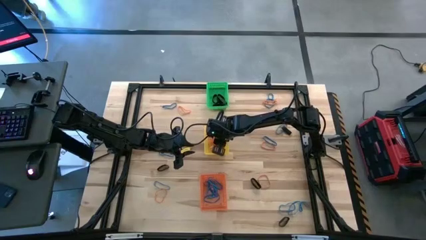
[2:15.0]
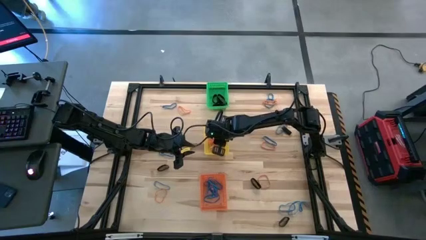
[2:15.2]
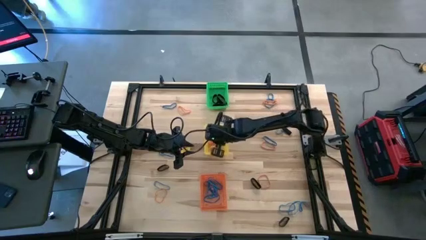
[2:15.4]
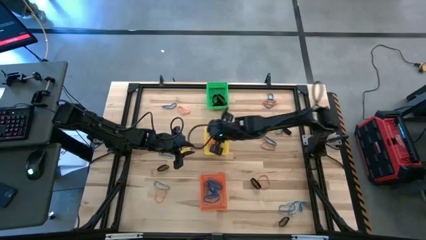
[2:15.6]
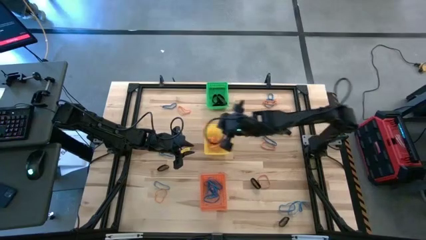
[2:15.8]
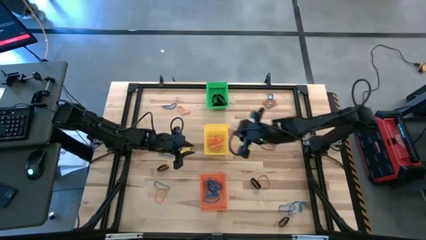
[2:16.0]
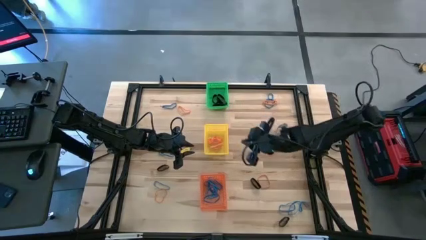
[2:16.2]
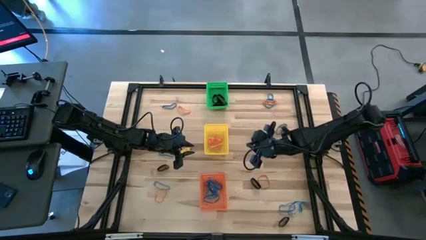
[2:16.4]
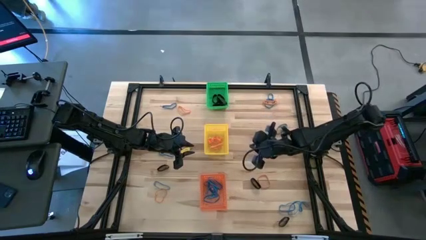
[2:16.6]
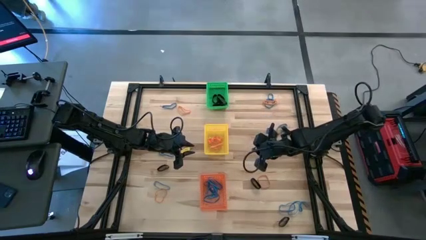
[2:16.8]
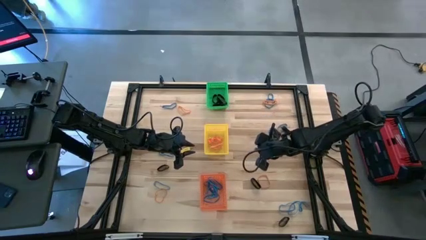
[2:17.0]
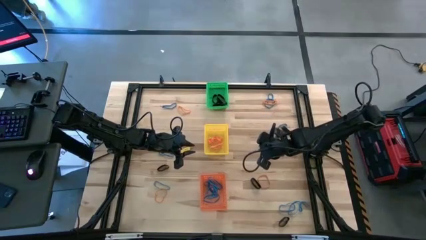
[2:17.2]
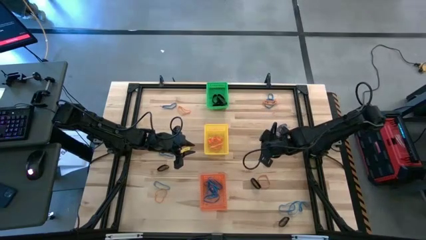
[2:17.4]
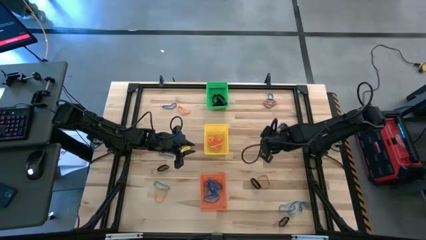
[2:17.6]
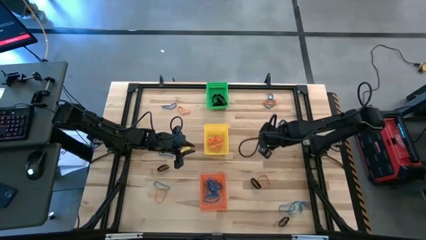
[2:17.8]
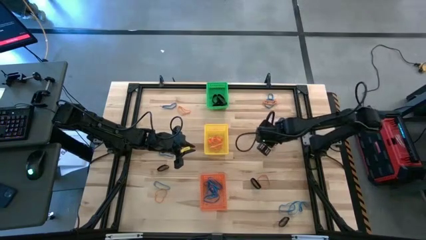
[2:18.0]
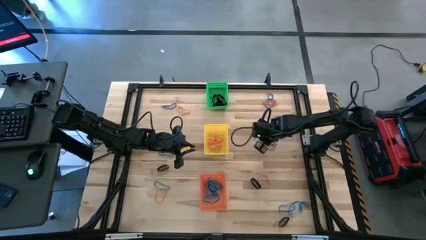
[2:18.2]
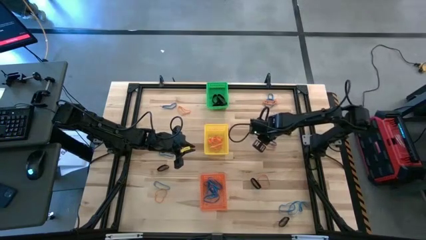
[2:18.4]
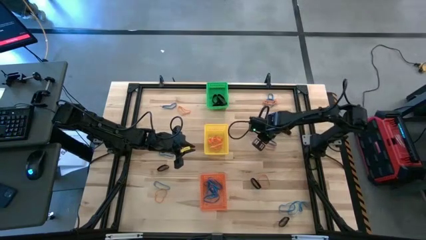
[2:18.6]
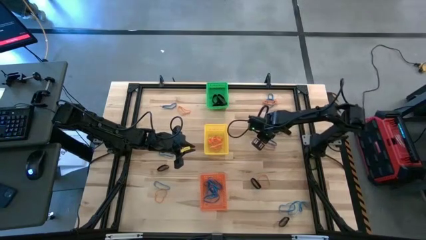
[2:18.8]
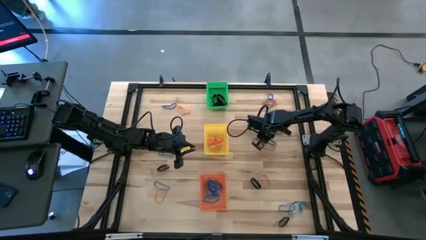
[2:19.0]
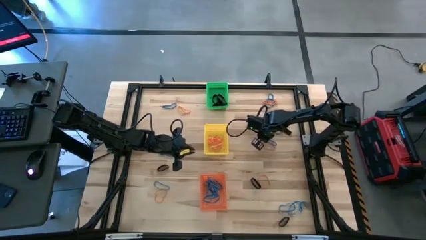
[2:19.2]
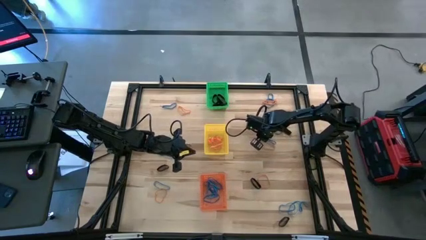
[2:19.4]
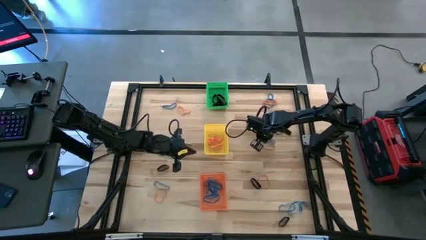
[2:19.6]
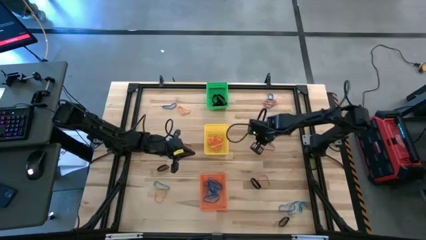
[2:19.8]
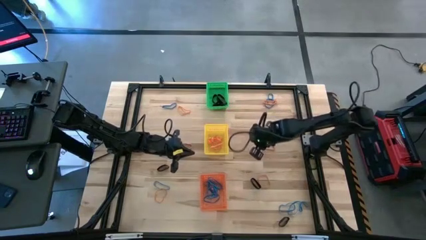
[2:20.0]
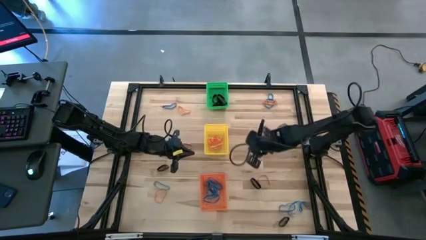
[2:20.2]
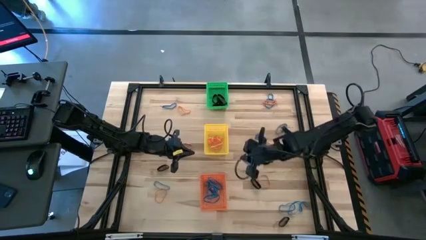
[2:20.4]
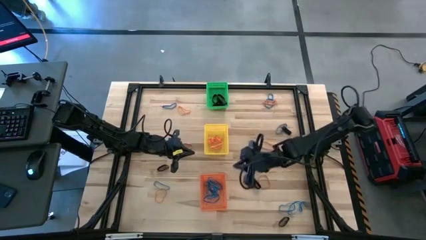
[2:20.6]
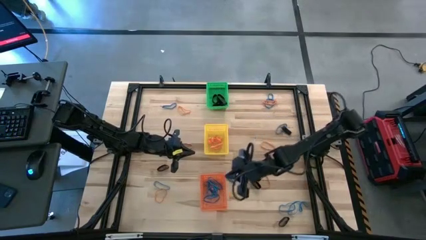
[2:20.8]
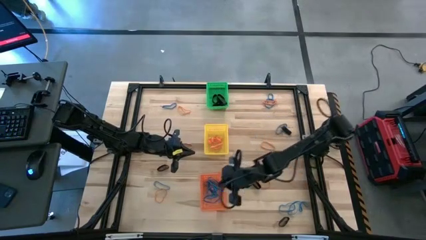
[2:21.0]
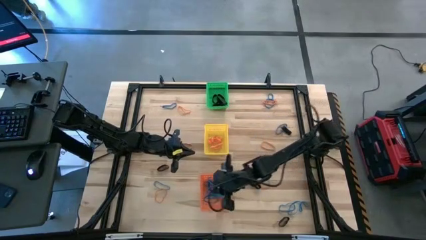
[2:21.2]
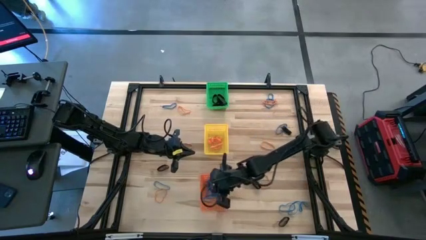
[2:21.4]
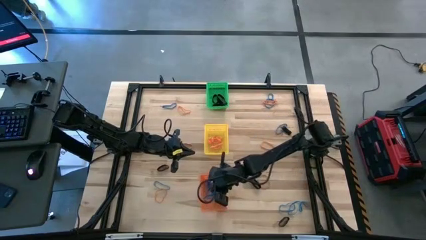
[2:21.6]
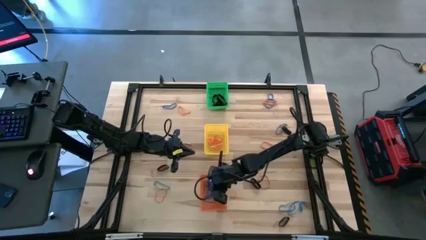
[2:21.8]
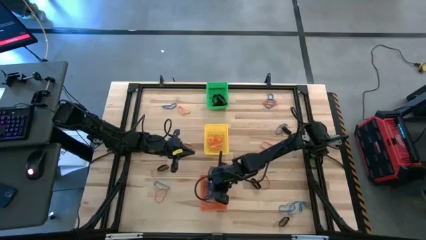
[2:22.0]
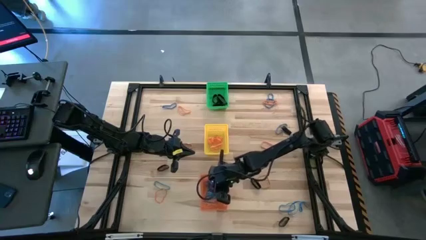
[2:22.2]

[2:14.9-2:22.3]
Task: Sort rubber bands into baskets
Put the blue rubber band into the orange bin

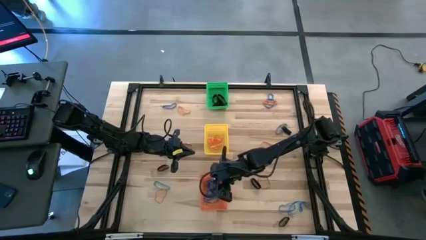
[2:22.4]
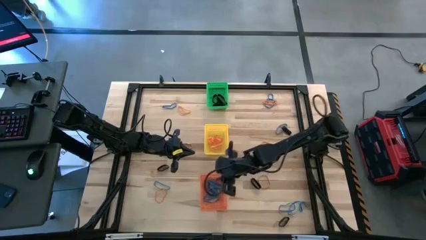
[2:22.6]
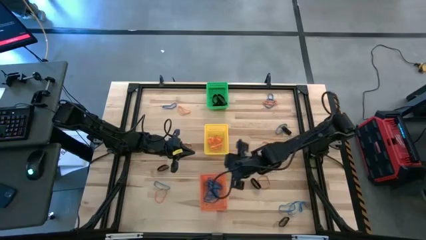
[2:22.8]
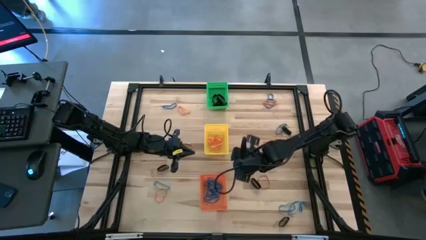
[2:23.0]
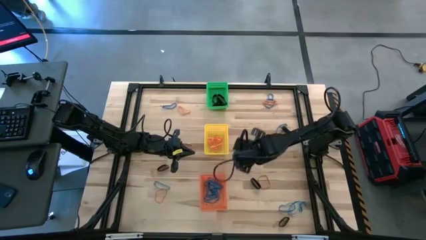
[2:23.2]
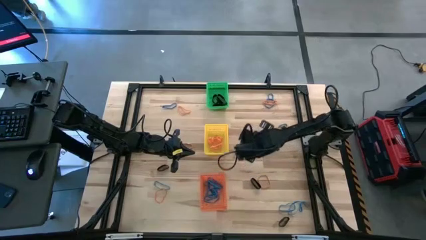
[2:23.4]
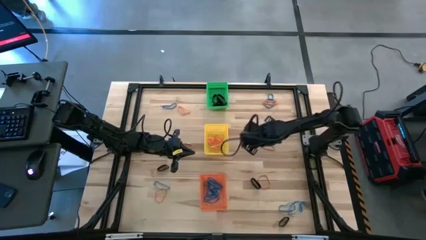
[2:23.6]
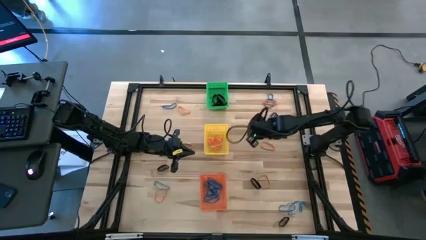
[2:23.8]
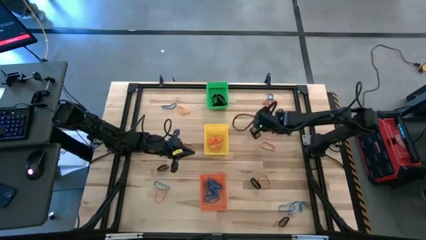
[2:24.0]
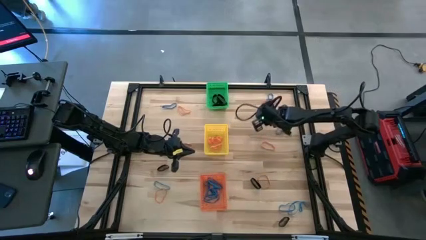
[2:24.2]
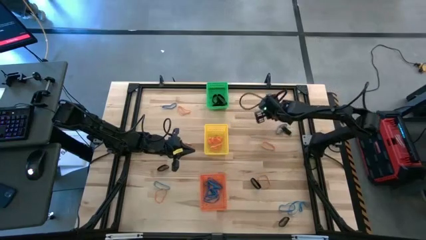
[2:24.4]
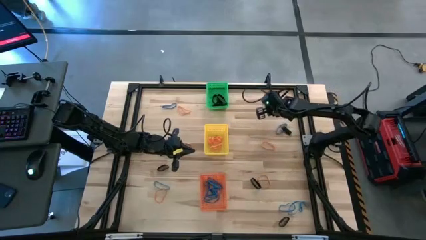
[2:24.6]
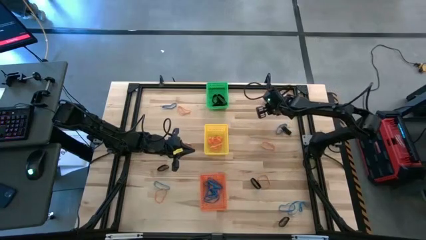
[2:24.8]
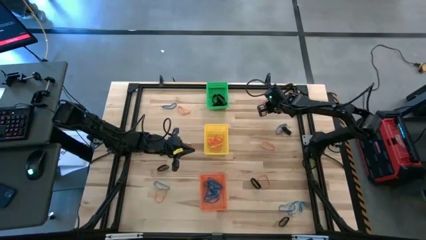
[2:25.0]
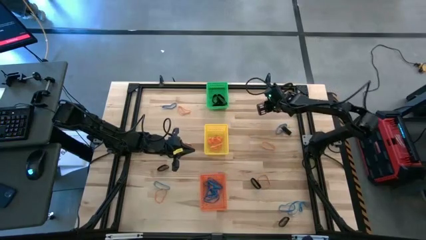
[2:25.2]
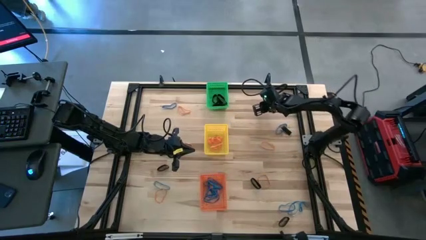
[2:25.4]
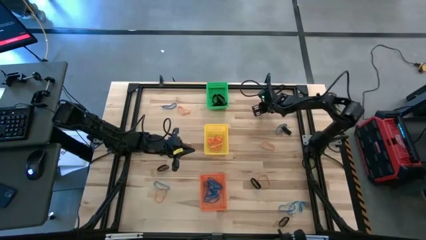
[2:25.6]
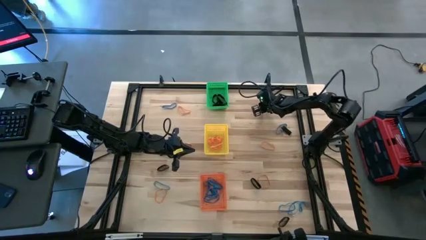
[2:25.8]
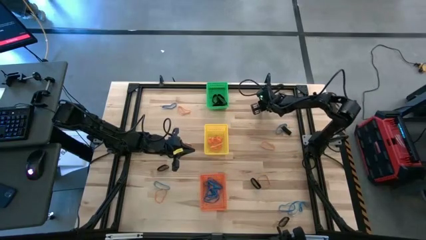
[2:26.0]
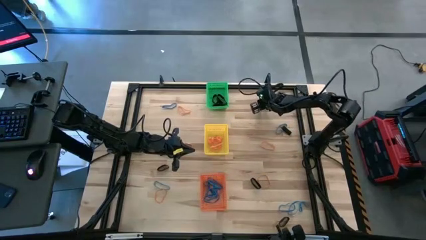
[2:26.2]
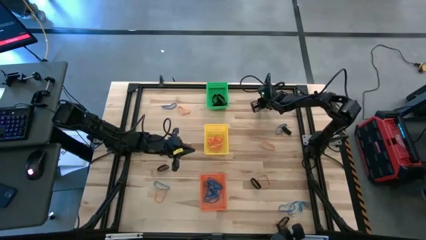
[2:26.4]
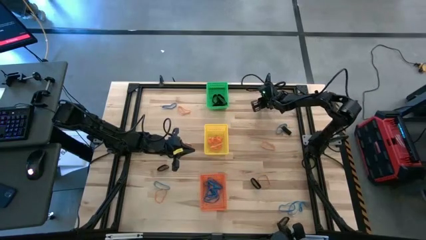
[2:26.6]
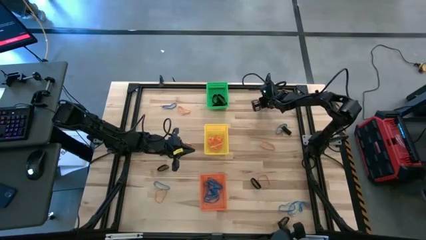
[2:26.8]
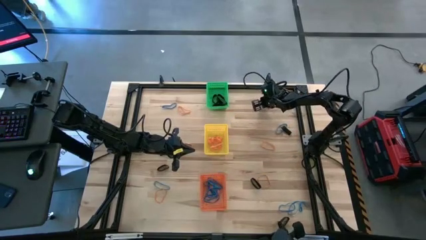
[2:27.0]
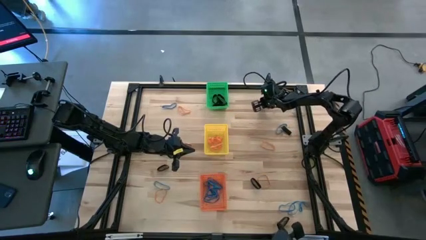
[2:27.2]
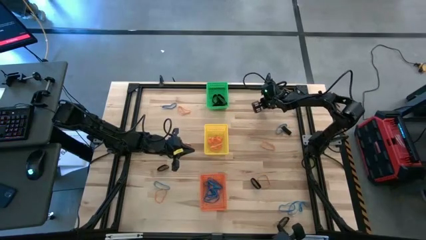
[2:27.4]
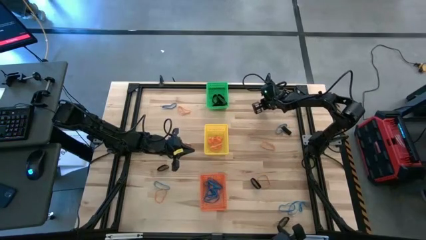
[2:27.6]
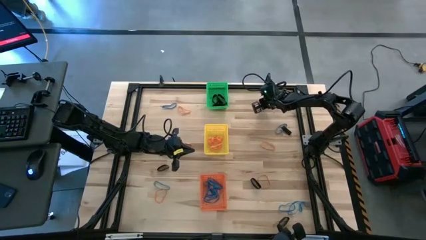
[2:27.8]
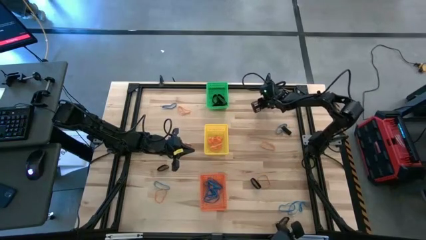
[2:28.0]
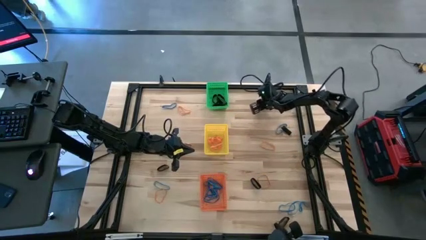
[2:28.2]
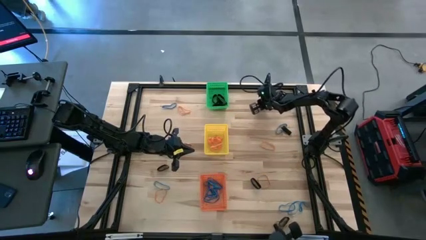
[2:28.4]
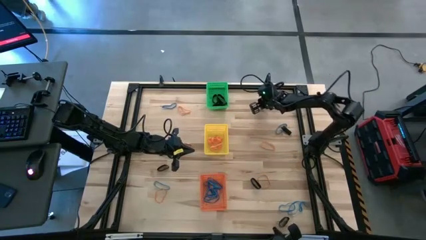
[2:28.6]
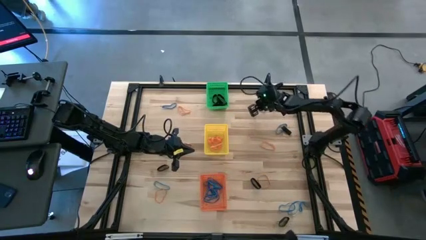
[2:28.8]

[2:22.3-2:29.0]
Put the orange rubber band into the yellow bin

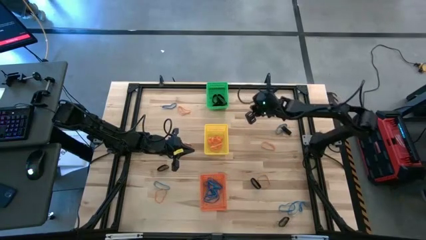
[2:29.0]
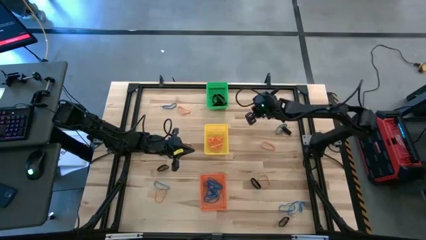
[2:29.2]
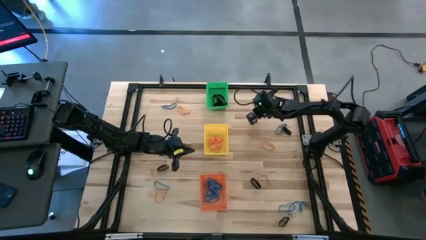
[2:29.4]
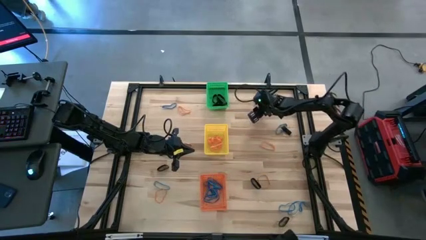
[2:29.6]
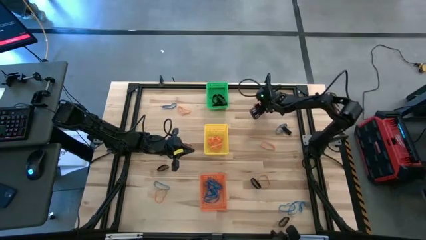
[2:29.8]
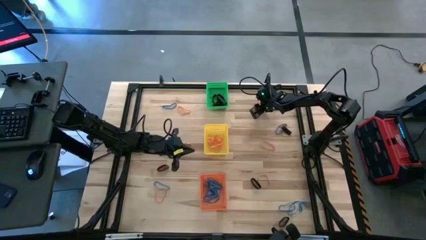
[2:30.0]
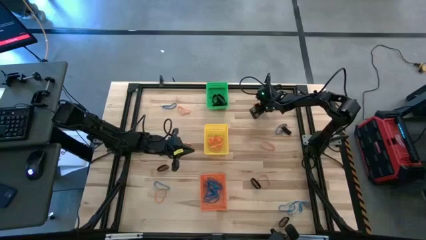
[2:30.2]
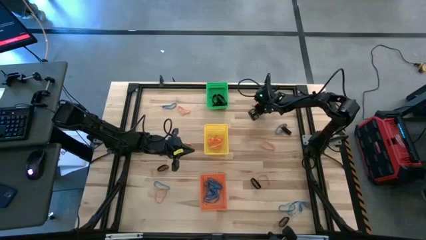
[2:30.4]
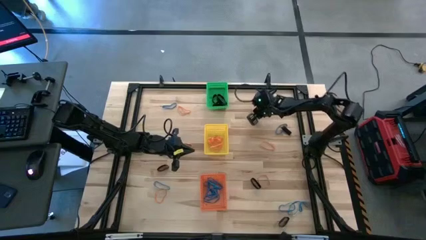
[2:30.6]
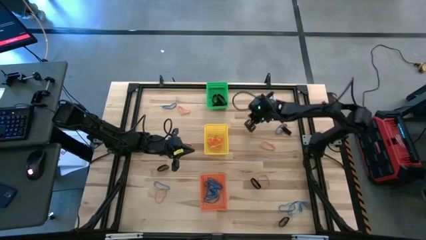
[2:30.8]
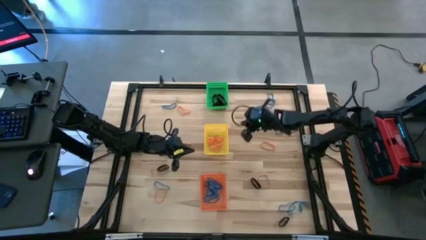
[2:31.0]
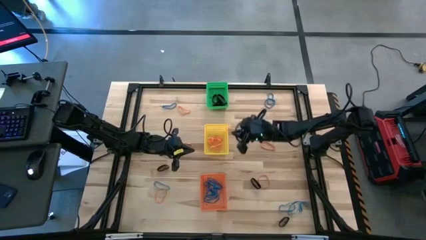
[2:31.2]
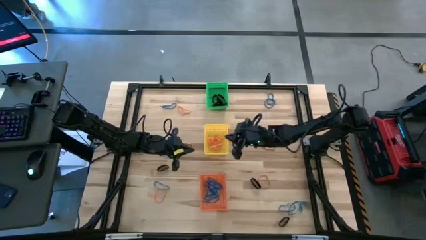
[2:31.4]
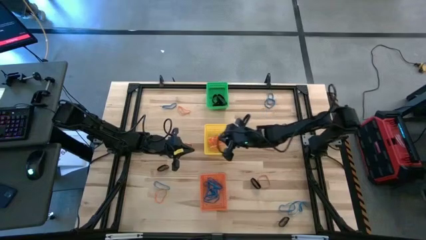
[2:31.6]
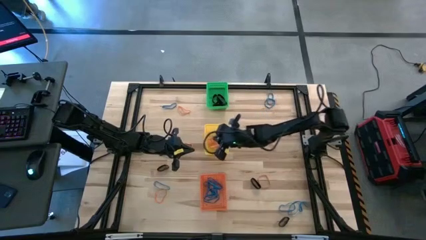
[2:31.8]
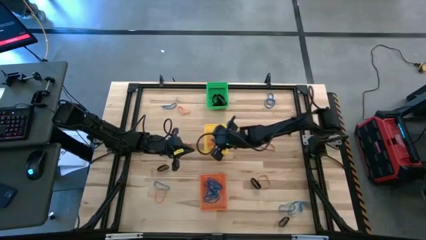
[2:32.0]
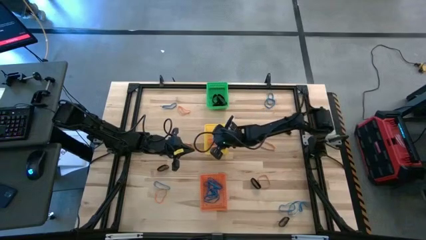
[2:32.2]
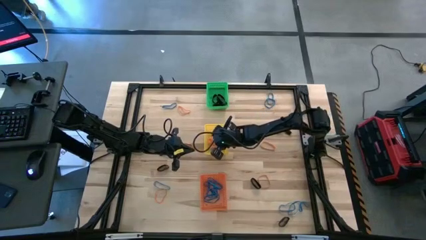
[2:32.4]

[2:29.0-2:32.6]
Put the orange rubber band into the yellow bin
